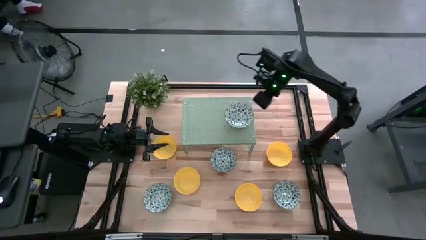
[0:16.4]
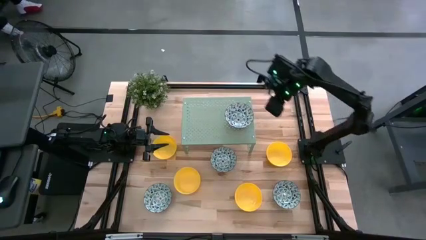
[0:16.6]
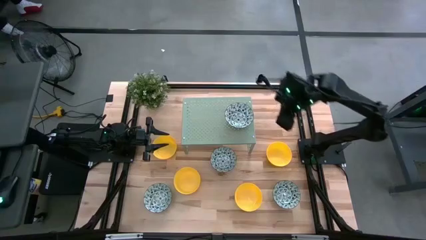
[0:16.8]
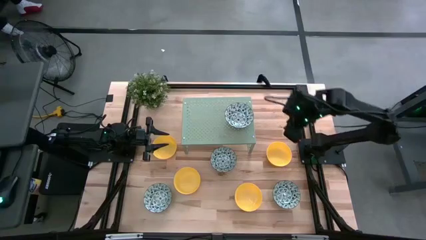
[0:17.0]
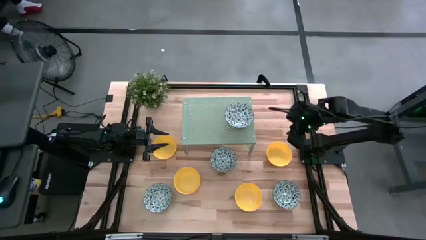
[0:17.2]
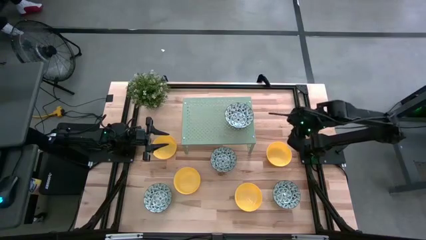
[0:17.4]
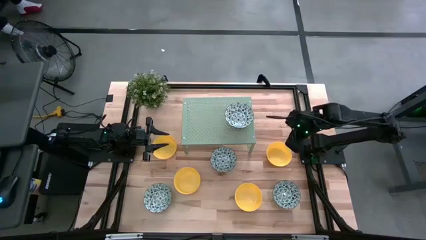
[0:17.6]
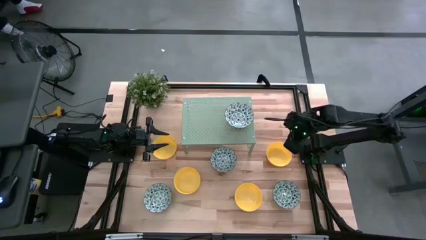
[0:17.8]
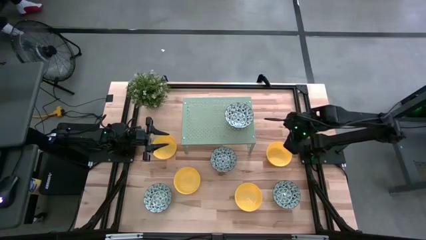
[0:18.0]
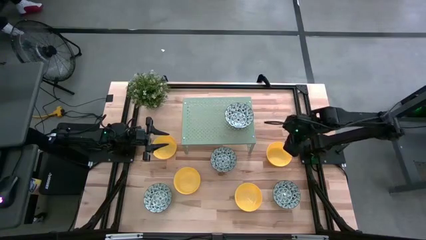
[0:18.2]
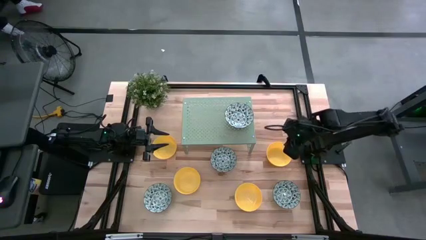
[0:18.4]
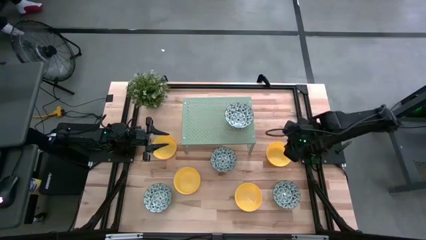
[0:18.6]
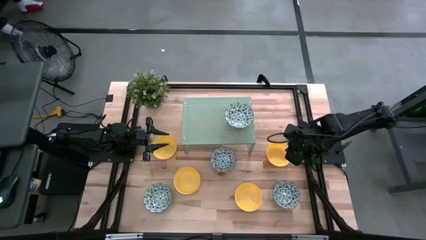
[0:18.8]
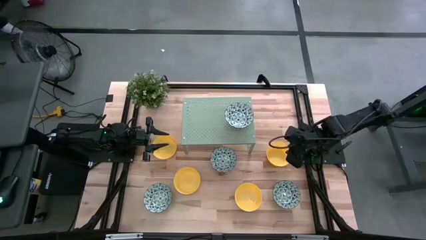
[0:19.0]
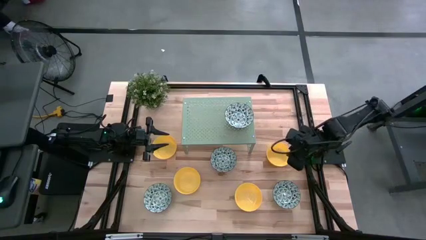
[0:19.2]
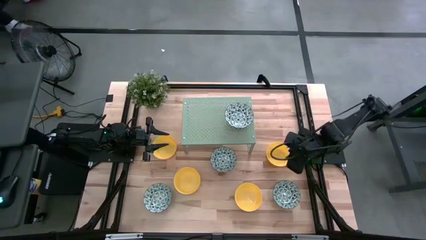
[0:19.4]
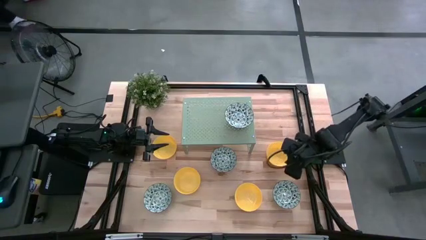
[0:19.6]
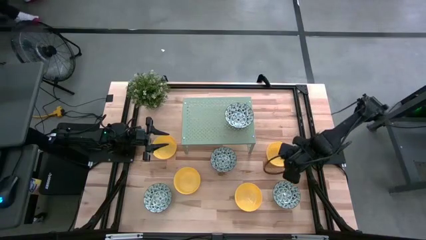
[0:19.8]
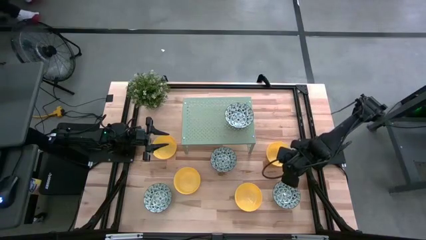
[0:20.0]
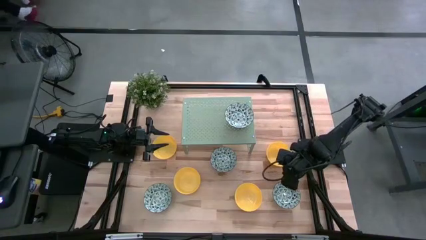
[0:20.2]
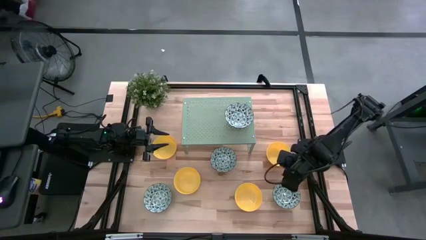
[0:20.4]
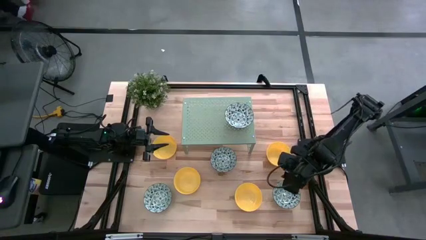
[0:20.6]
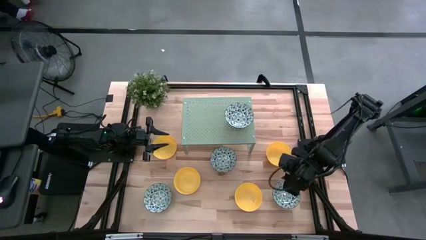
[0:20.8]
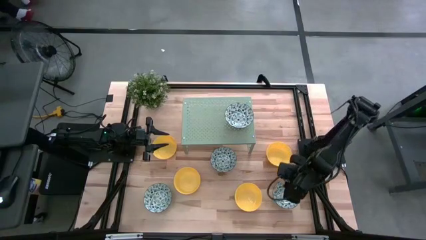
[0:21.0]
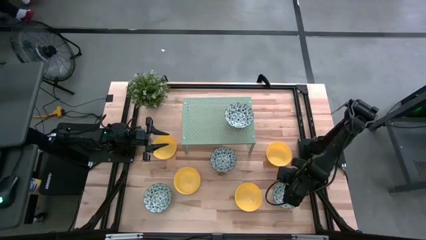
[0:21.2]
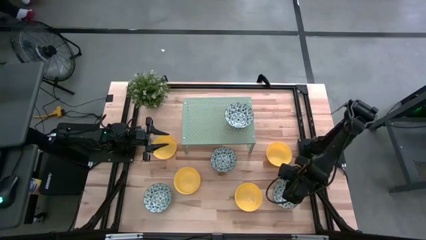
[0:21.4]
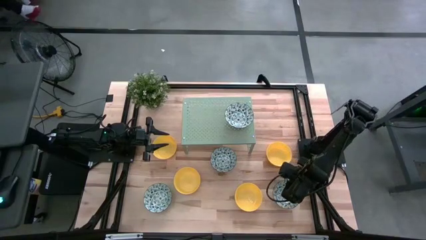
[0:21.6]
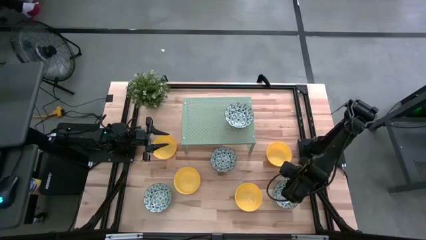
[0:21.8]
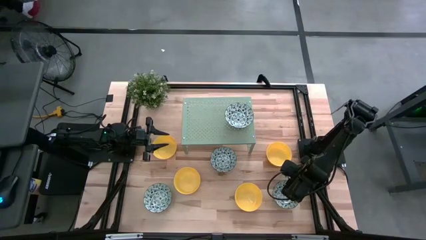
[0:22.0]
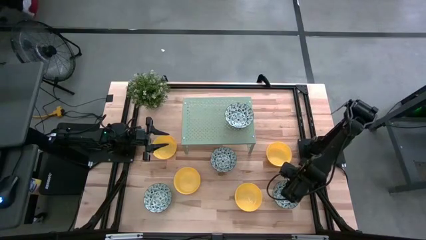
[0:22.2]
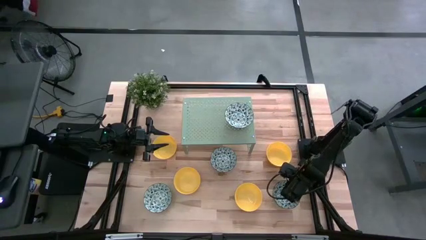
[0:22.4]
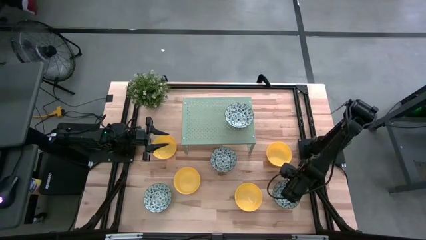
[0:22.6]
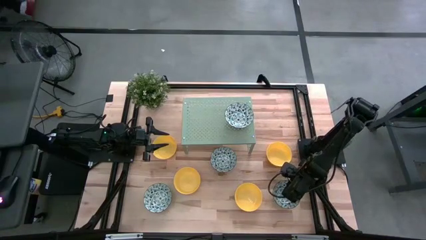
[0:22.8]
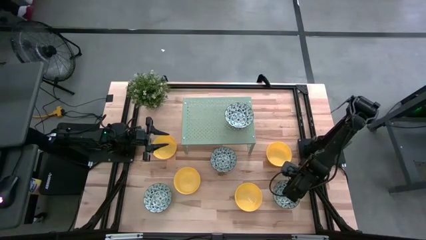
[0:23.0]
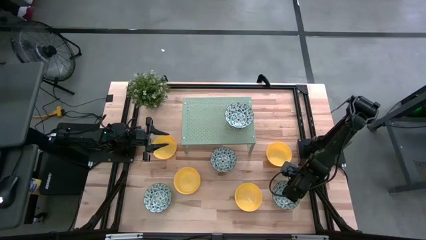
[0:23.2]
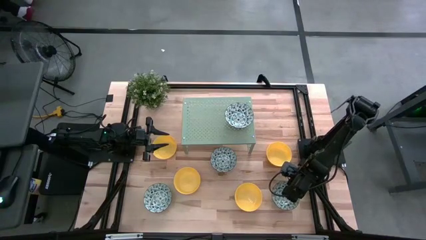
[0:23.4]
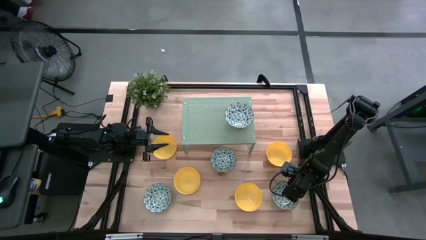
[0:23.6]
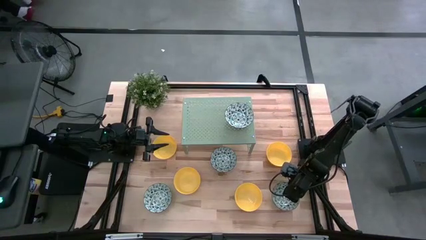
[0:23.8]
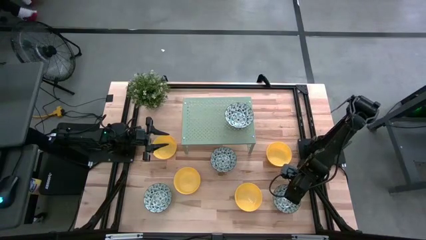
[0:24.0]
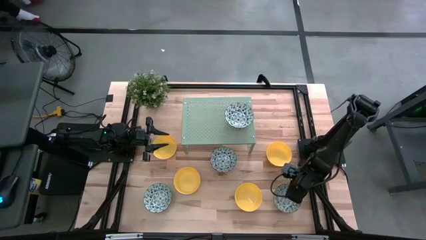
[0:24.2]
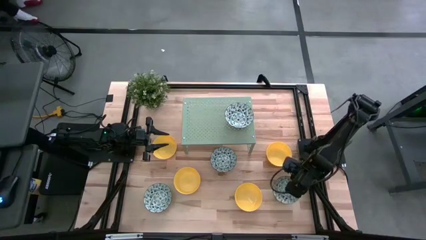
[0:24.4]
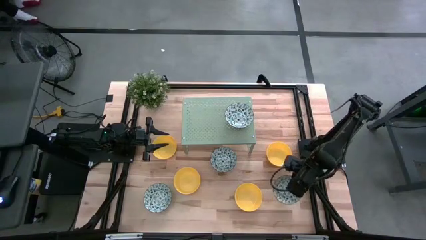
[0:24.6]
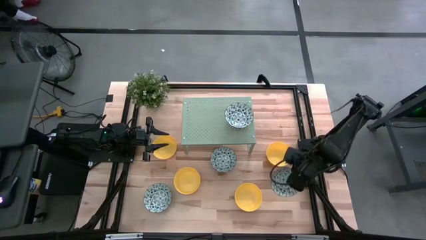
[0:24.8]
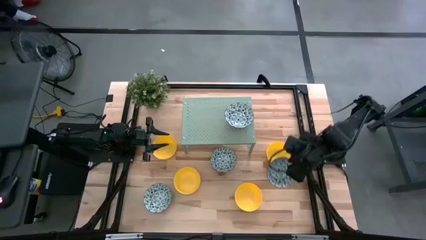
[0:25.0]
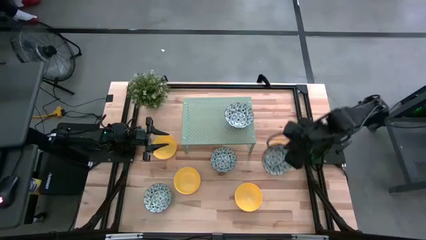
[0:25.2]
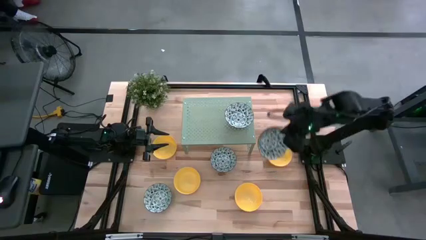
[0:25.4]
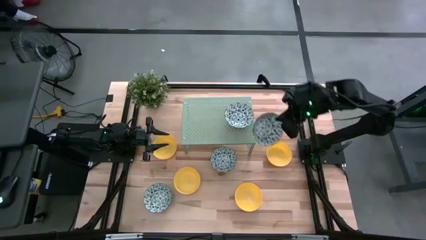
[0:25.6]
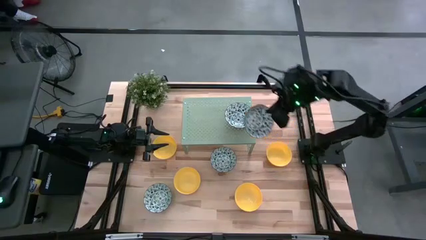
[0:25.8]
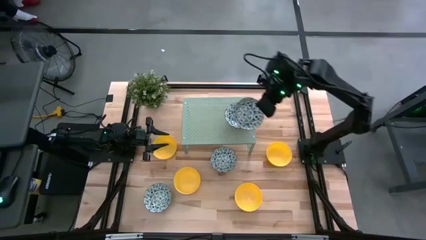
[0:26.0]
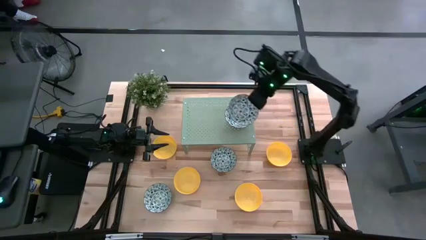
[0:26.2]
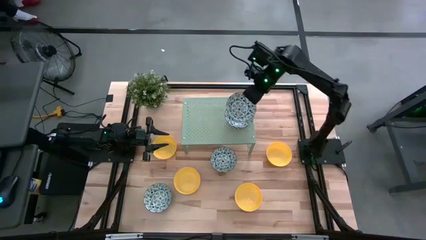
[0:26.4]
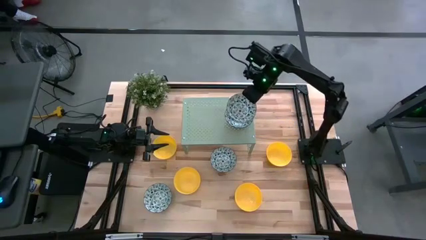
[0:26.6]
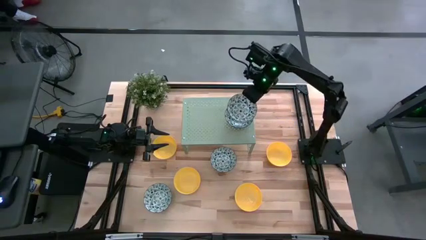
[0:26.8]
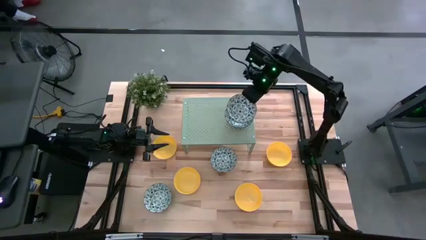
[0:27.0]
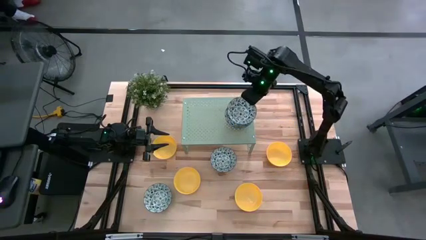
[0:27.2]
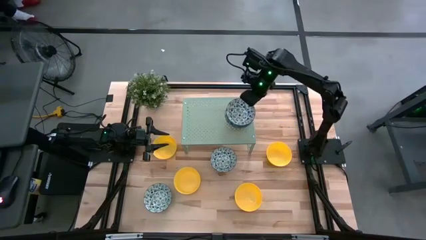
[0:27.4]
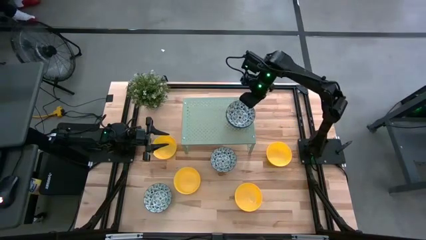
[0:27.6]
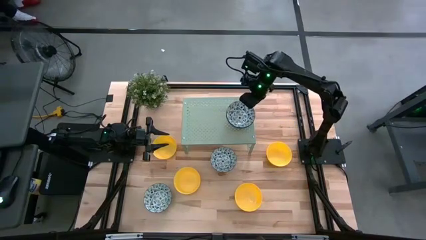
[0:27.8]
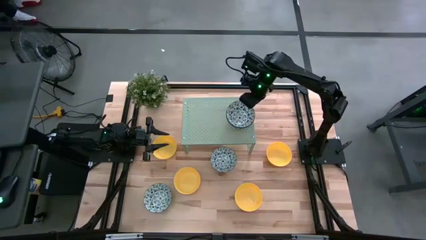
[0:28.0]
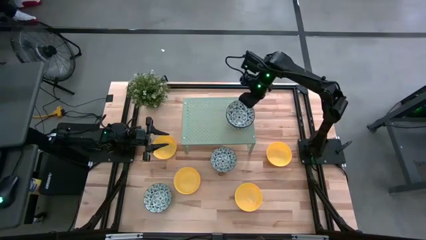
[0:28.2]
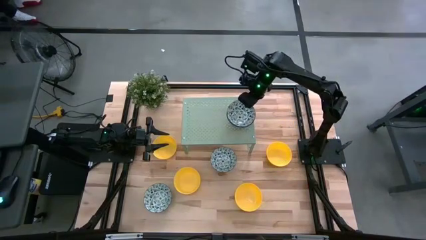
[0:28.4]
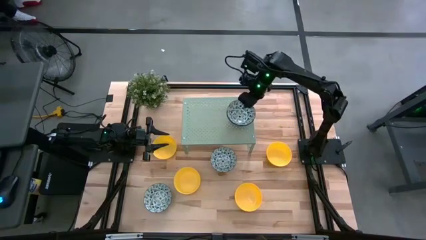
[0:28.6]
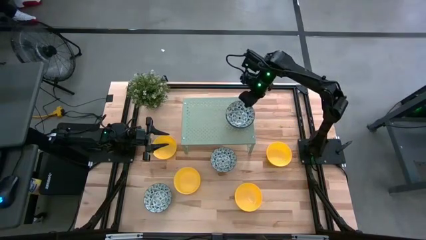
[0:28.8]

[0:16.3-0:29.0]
Task: Pick & Place Mini bowls
Stack the bottom right green patterned bowl on top of the green patterned bowl on the shelf
